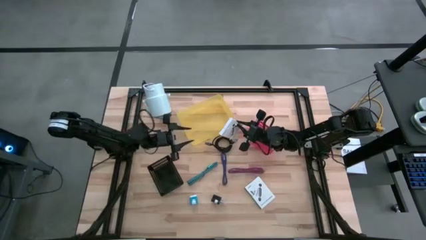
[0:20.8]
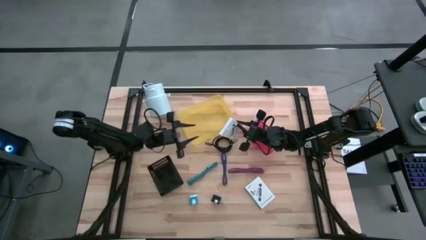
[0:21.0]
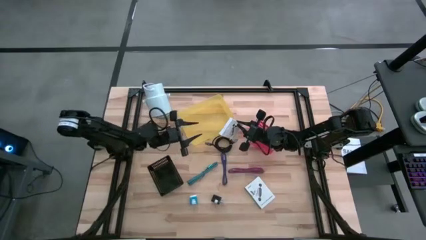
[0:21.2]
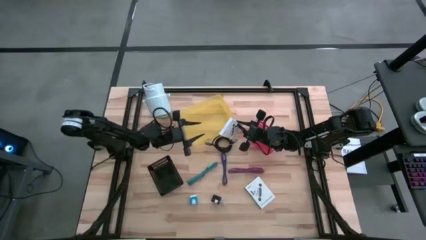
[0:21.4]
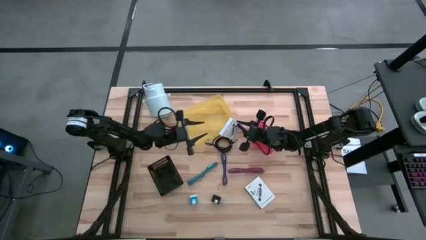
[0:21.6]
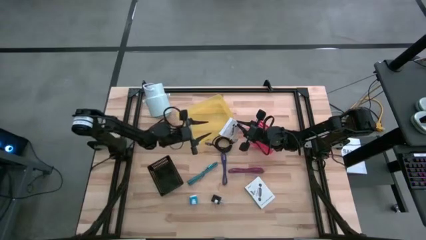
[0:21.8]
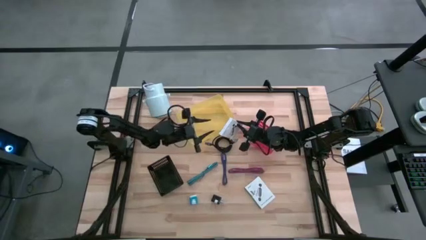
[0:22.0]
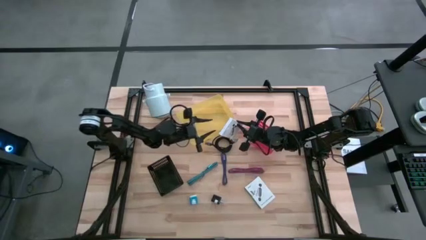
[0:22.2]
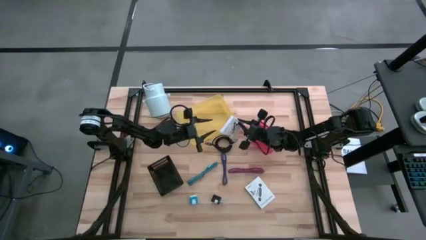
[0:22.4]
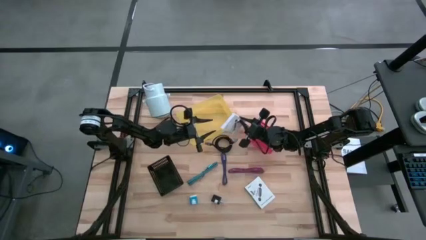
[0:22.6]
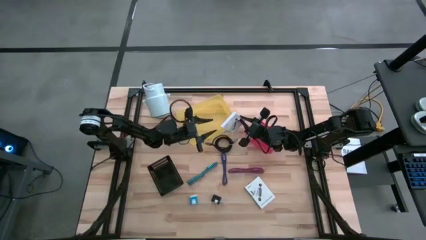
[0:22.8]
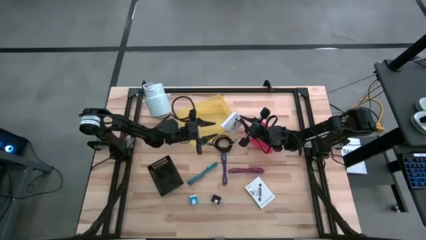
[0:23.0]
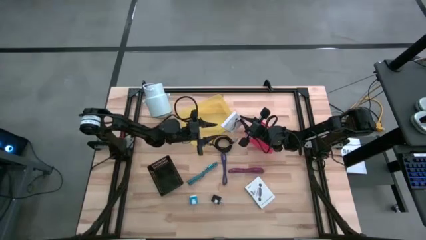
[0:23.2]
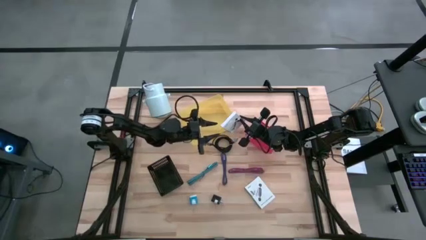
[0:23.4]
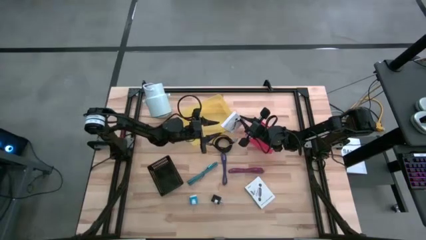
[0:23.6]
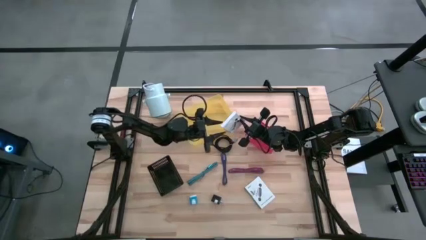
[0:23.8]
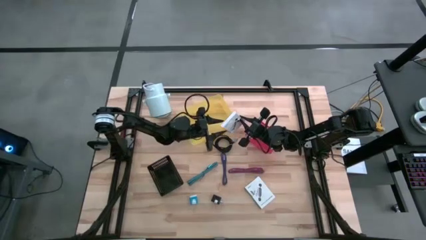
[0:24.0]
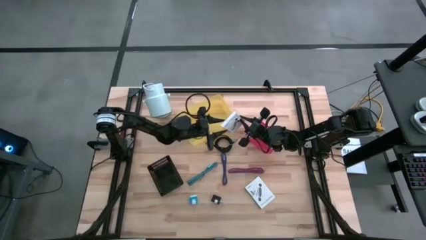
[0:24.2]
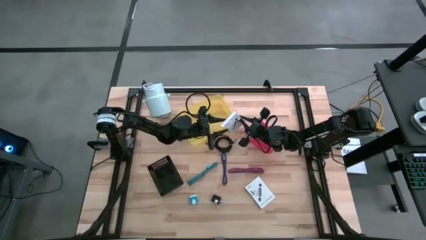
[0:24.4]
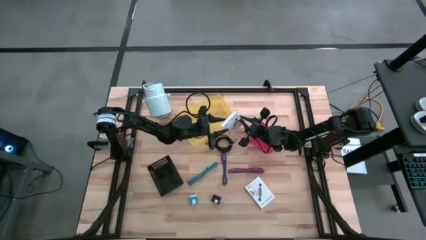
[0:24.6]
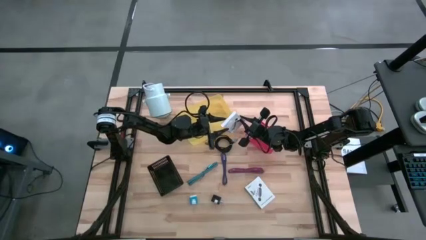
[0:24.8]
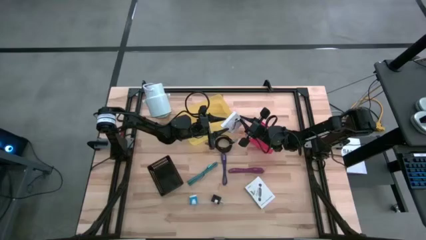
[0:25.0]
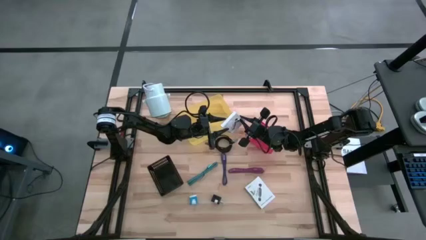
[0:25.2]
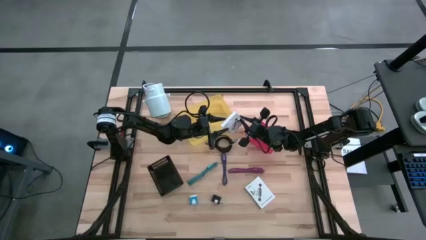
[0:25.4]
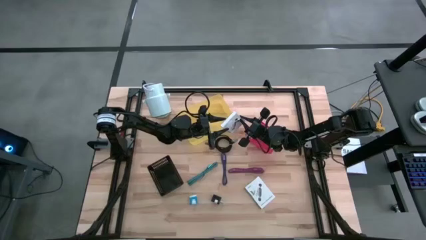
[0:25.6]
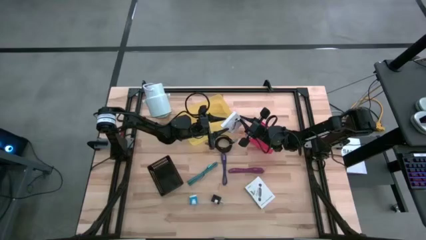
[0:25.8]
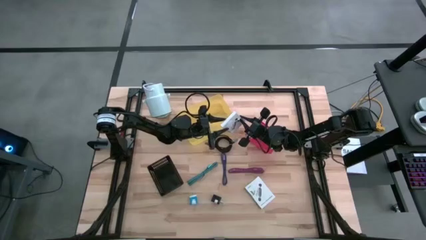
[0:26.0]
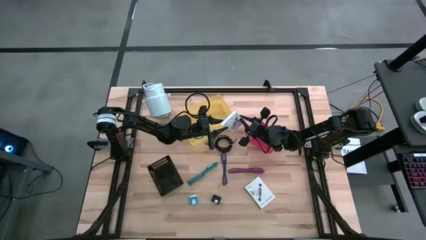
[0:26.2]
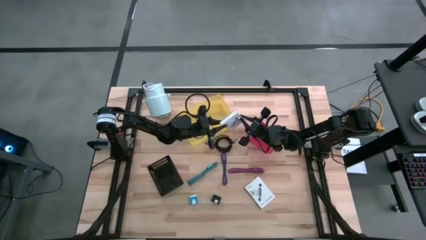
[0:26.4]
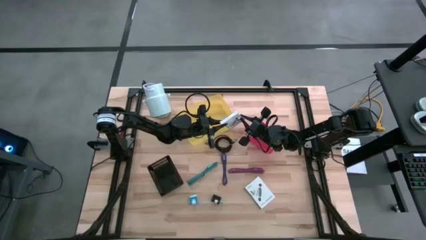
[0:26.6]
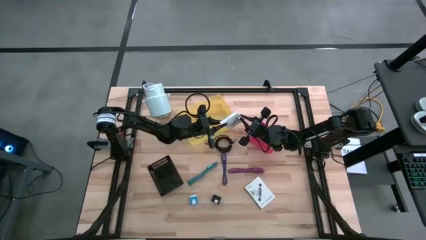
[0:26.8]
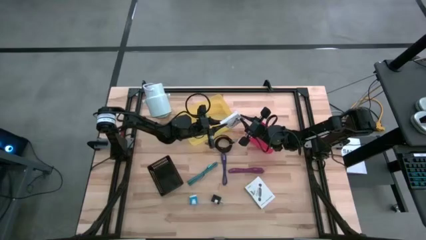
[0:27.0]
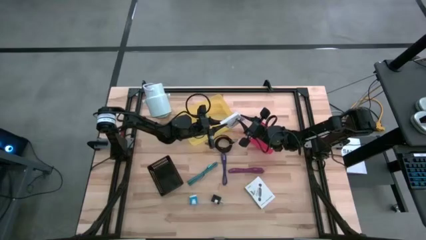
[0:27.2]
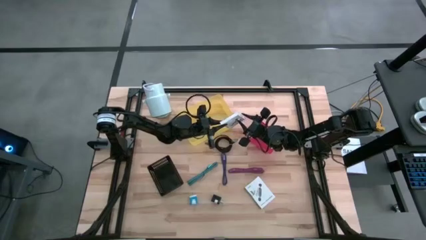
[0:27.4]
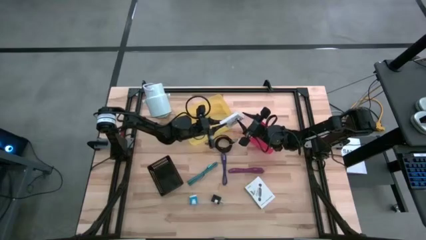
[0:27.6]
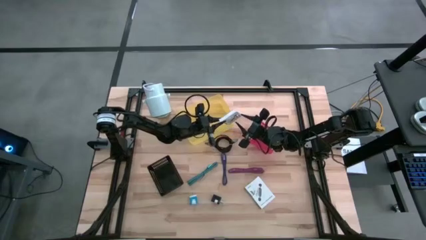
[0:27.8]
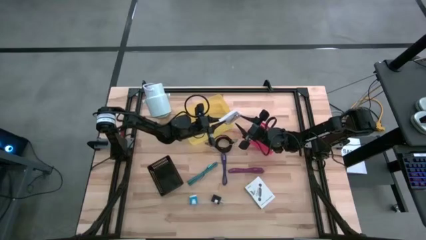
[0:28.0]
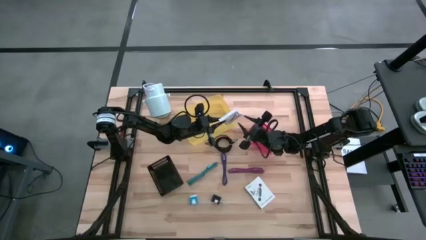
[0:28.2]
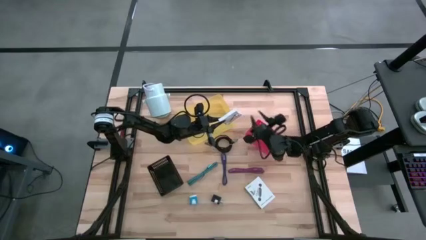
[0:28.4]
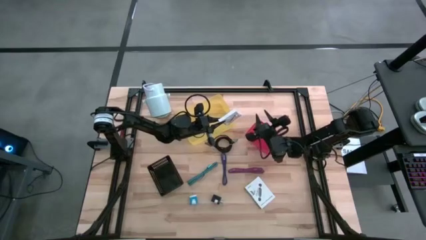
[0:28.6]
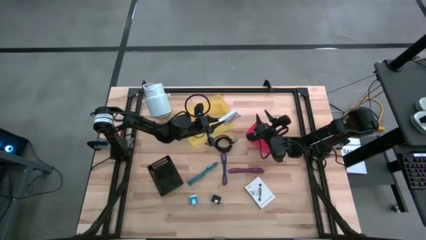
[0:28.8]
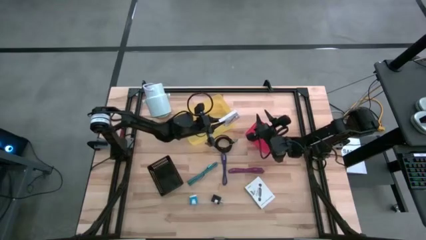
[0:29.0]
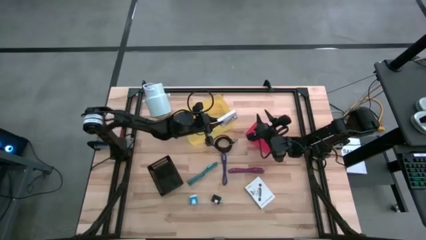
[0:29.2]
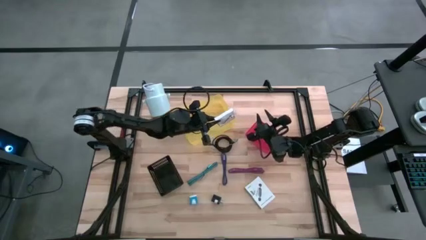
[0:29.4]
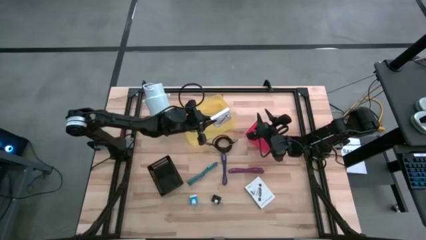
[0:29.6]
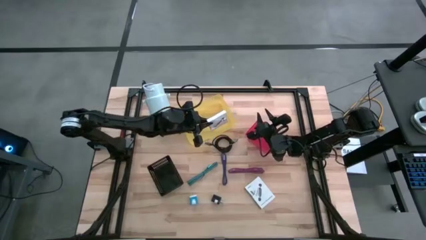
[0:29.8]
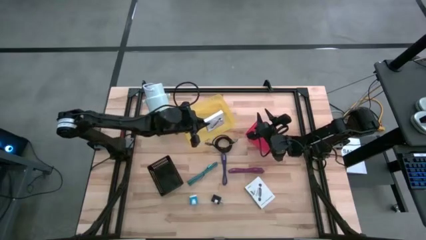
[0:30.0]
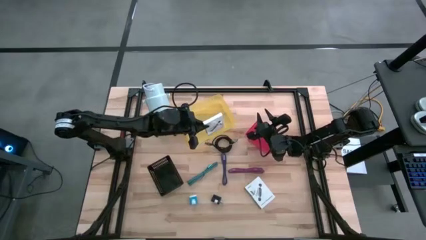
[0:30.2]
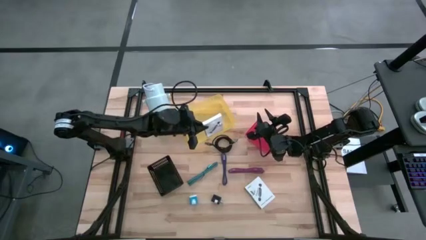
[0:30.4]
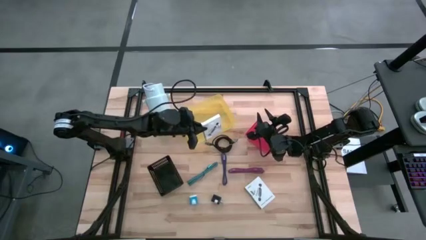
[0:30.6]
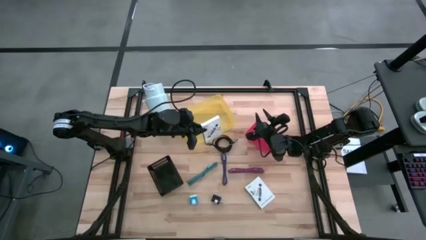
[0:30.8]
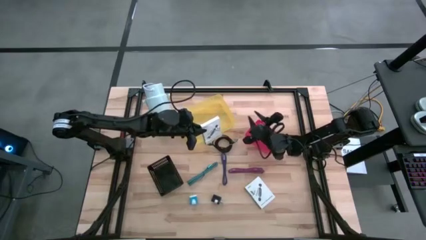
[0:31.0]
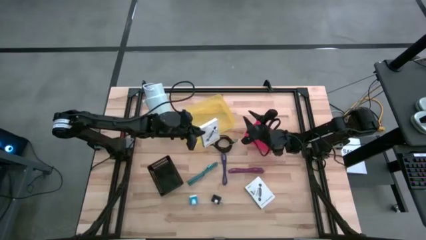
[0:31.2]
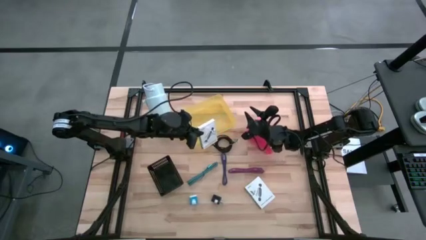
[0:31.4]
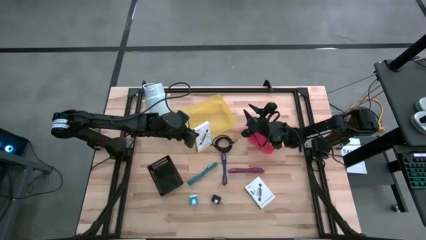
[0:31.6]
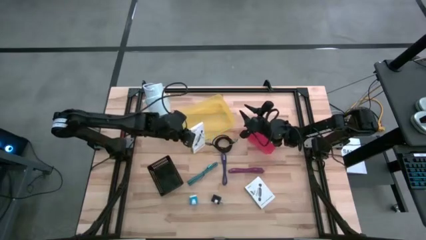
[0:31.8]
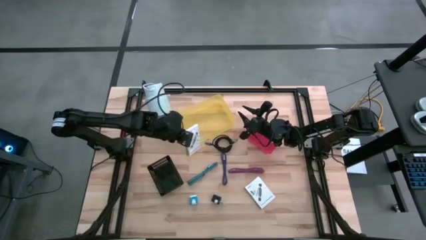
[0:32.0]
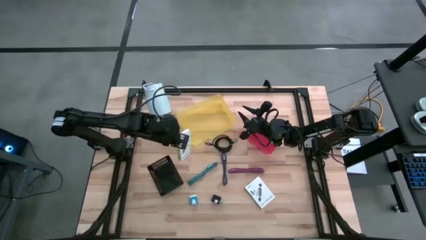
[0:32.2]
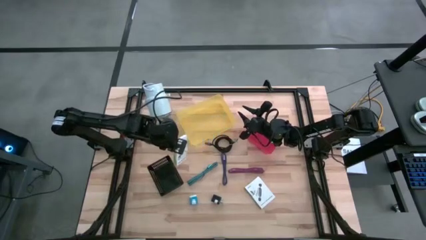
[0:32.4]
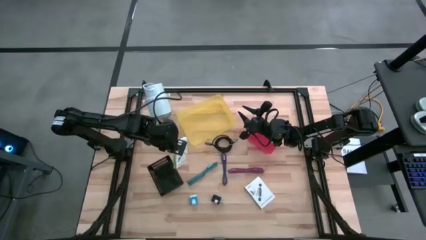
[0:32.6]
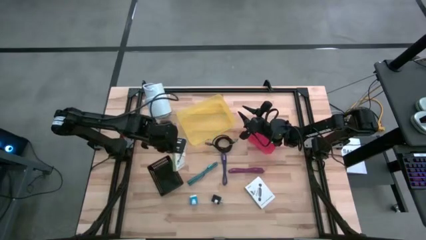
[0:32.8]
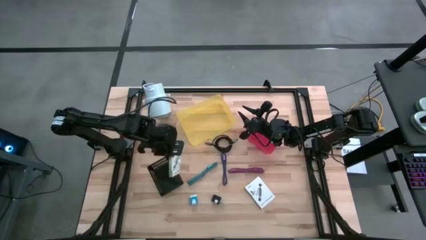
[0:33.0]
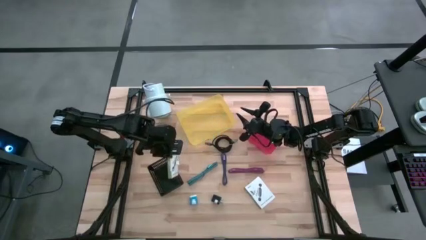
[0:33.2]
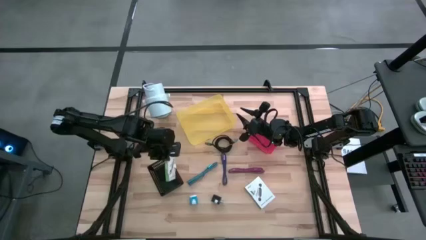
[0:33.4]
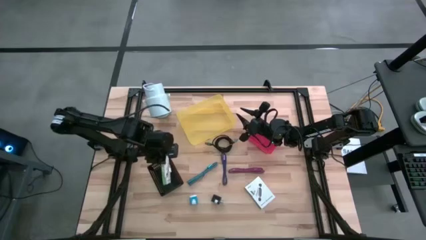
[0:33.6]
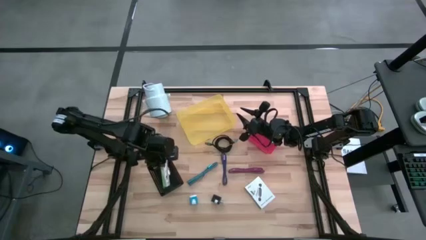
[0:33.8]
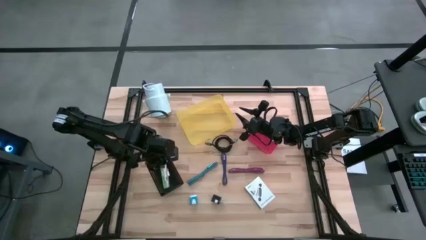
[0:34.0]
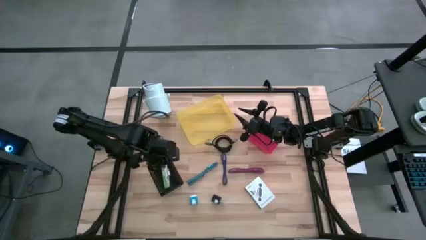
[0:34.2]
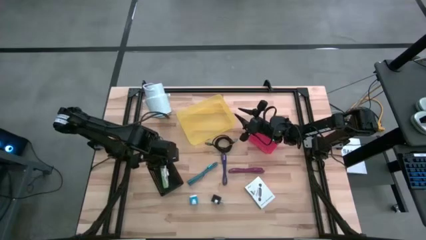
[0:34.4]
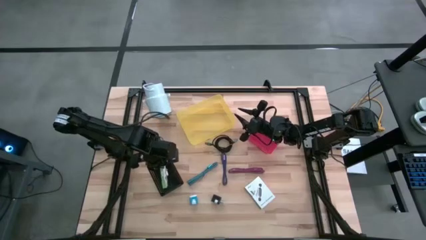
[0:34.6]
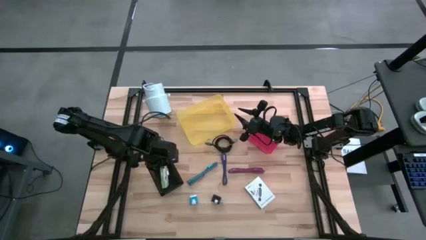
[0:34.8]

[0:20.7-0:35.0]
Task: Pick and place items into bin
Put the top card reader box into the black bin
